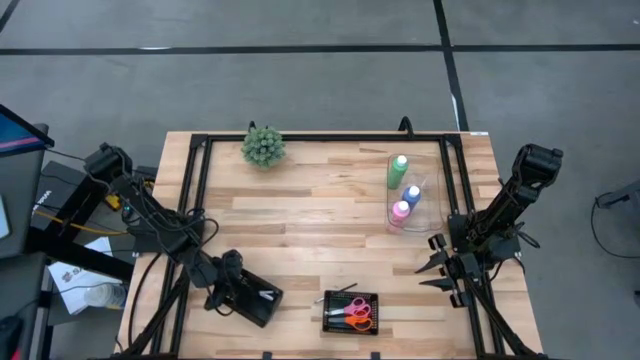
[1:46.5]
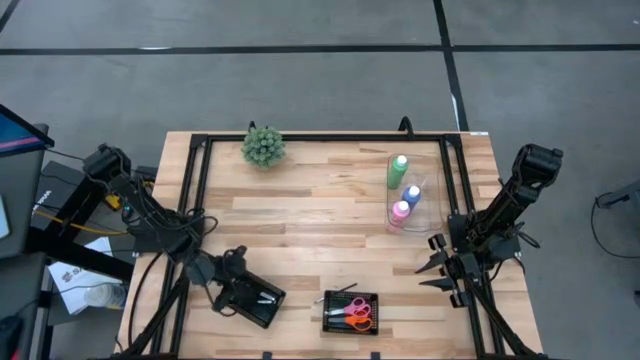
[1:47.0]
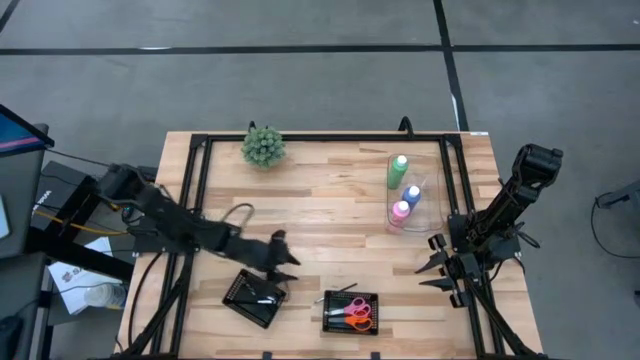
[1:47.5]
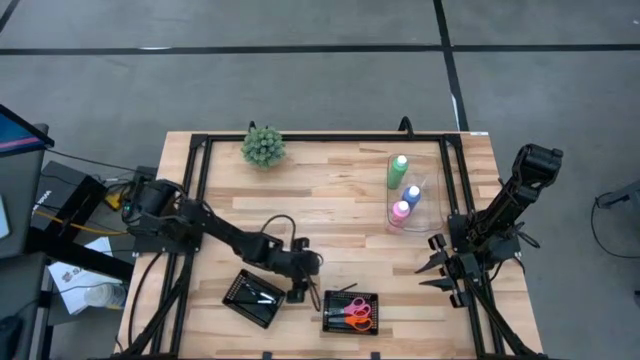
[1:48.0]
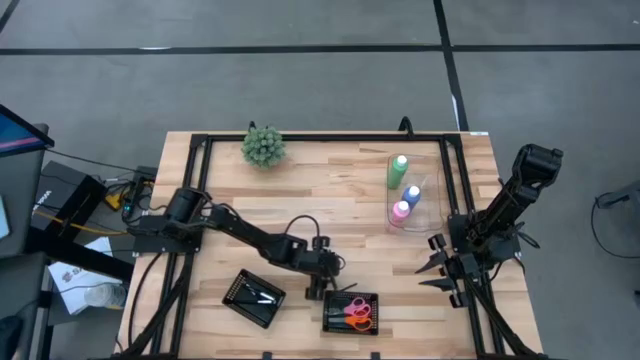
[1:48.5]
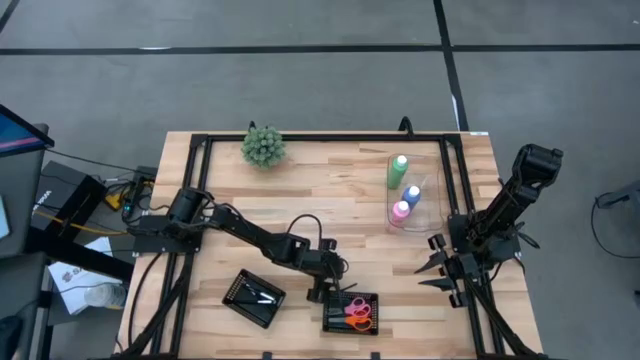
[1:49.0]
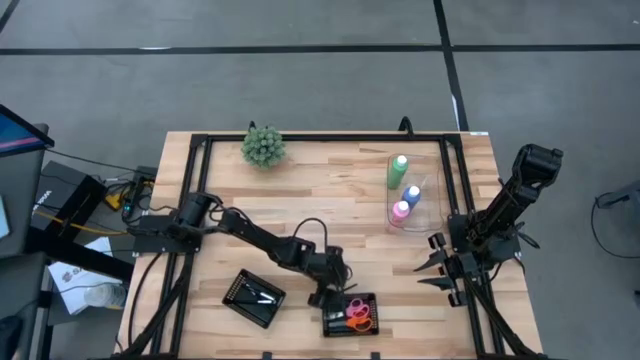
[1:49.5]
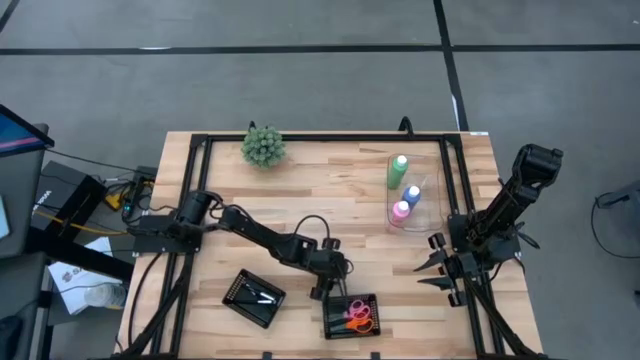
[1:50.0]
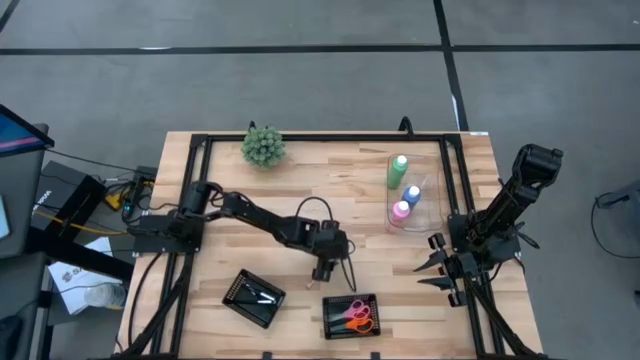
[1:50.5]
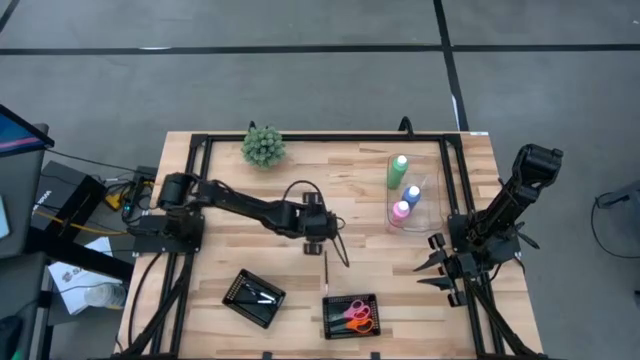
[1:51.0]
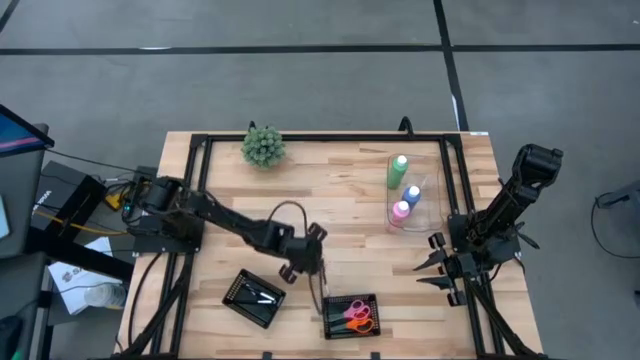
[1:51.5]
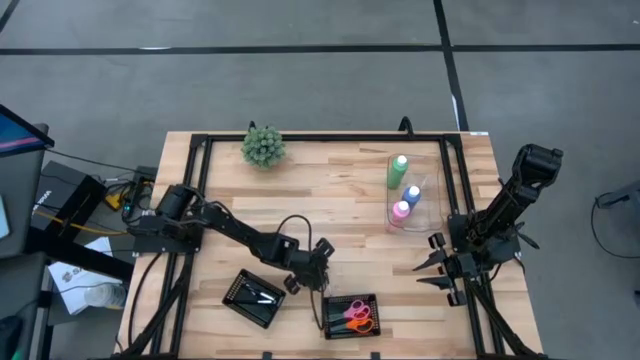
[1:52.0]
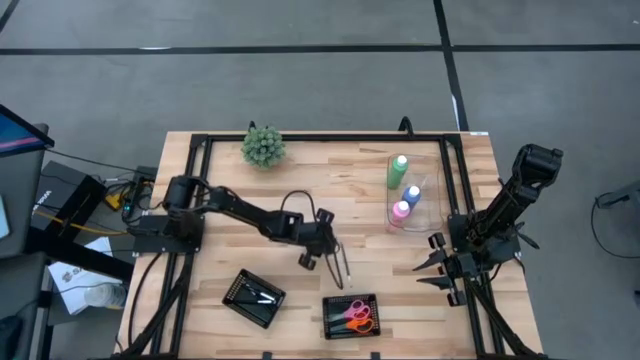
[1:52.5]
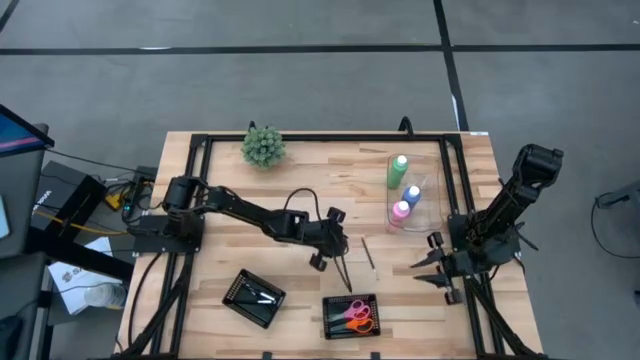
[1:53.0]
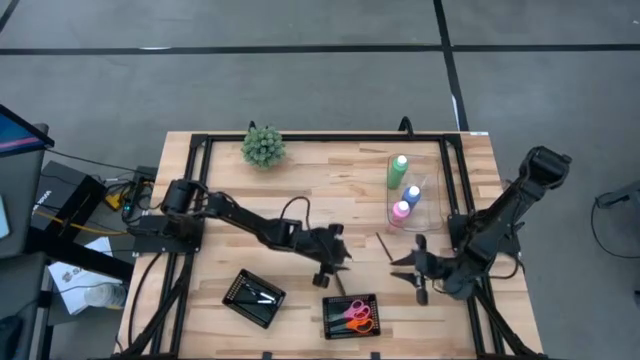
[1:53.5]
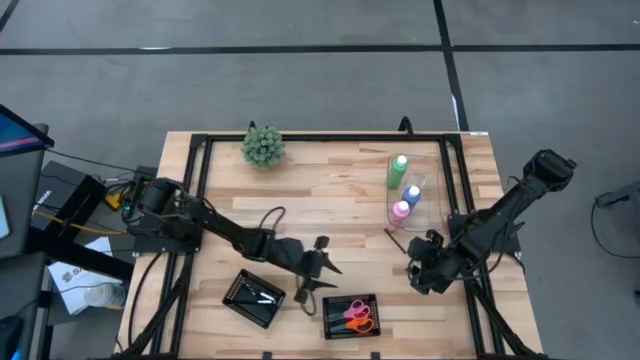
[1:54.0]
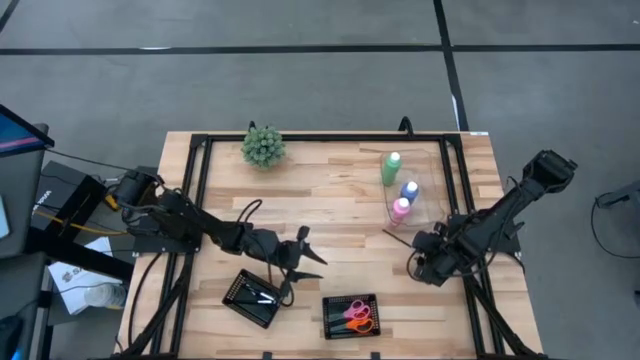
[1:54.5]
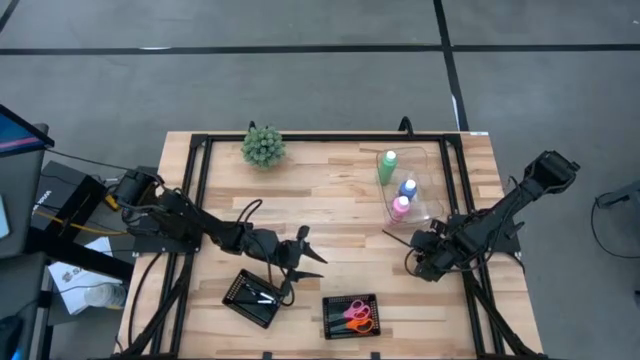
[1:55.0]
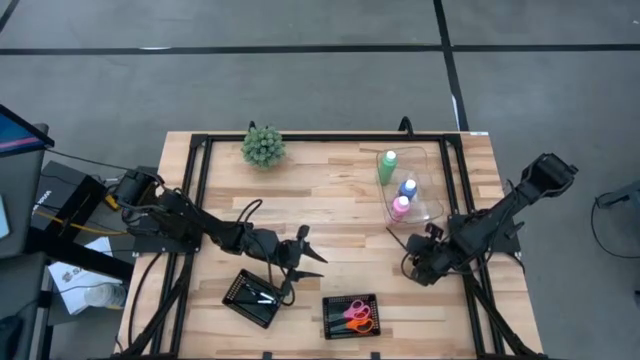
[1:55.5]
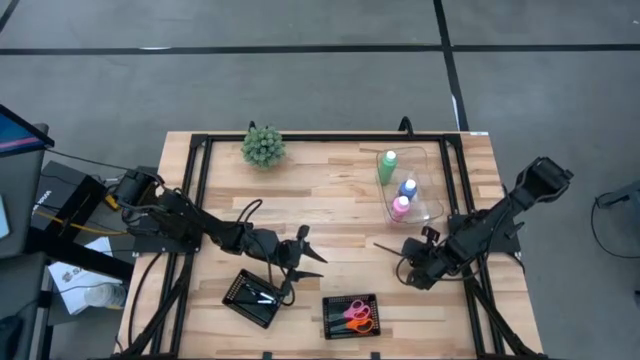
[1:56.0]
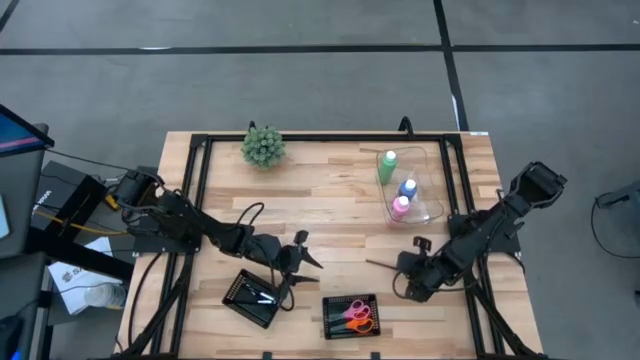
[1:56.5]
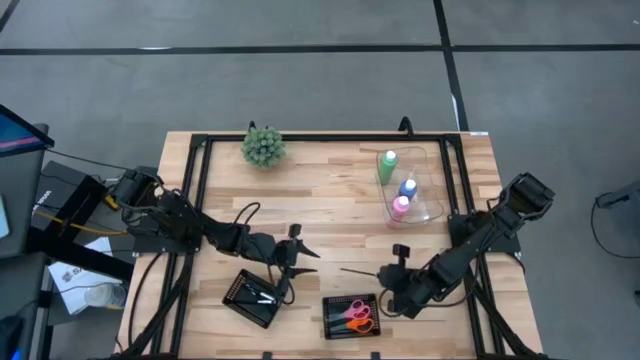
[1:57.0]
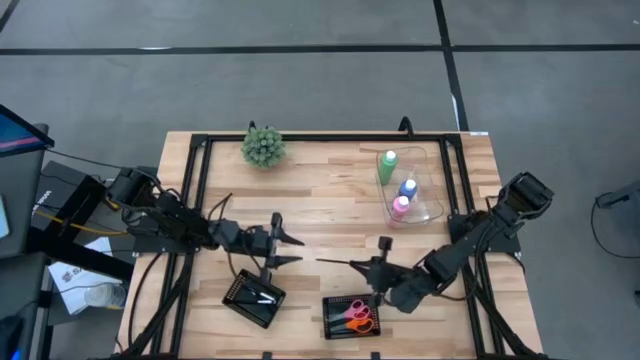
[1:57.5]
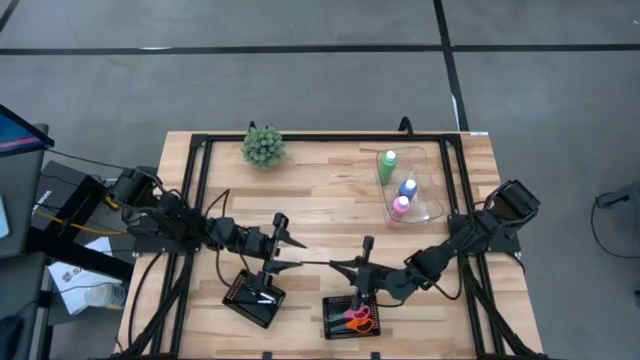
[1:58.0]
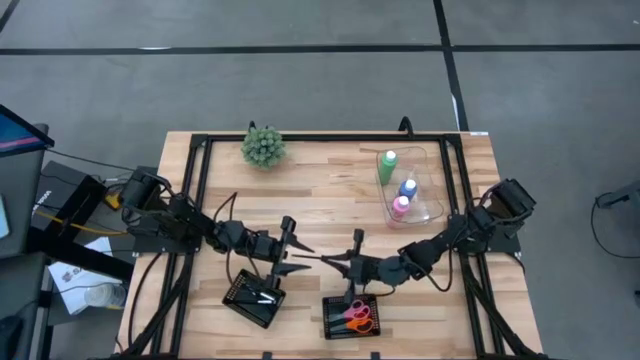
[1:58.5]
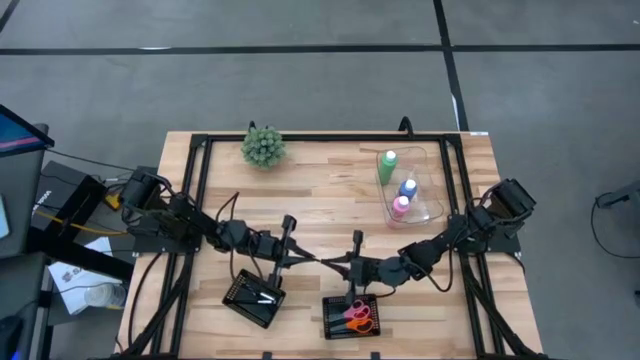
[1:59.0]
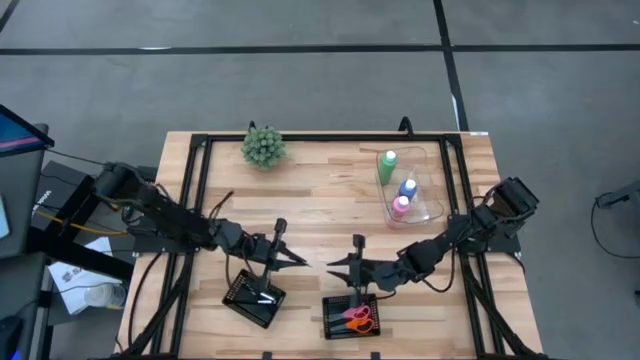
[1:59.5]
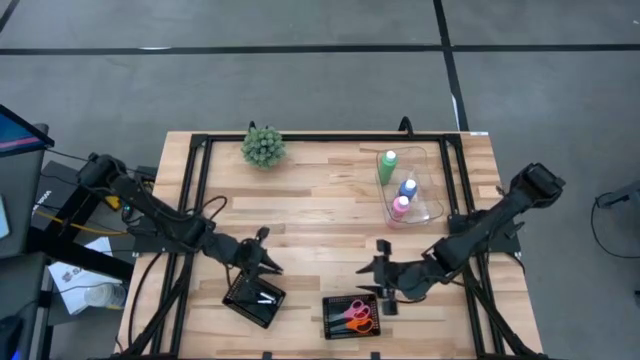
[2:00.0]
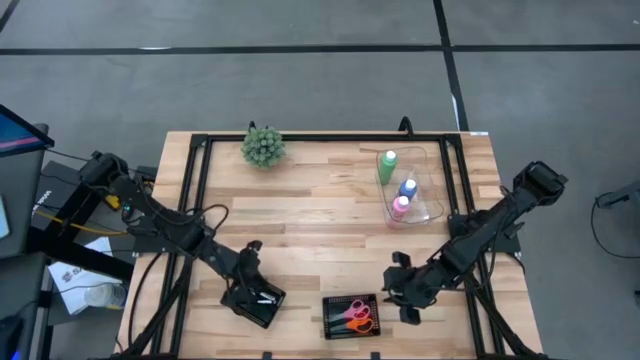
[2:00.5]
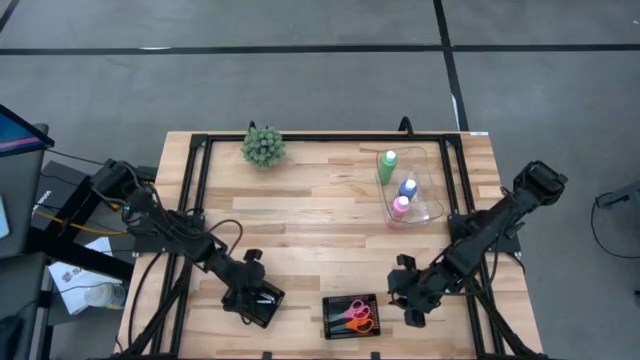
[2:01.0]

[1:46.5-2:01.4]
Task: Pick & Place Paint Supplies
Put the black makeup brush into the left black bin

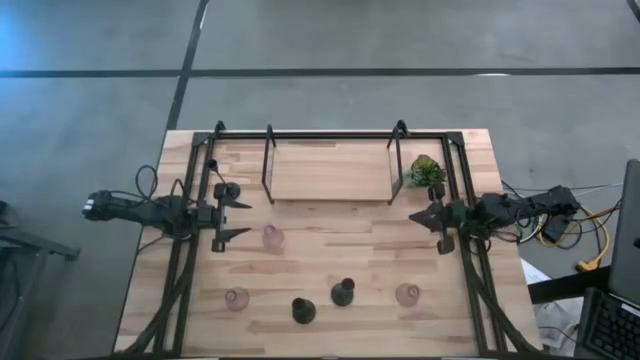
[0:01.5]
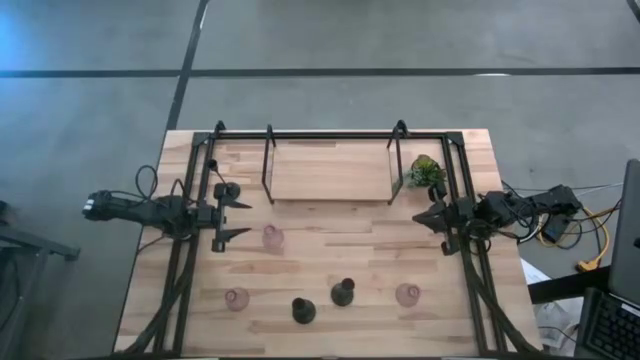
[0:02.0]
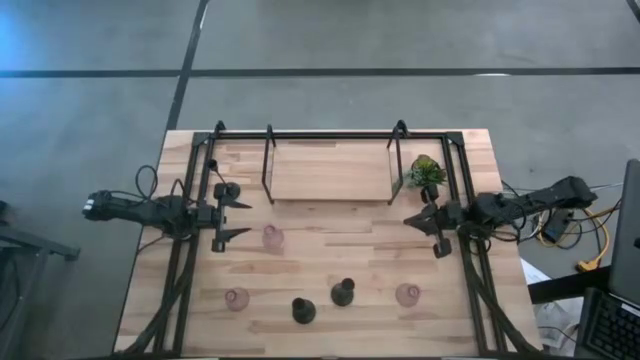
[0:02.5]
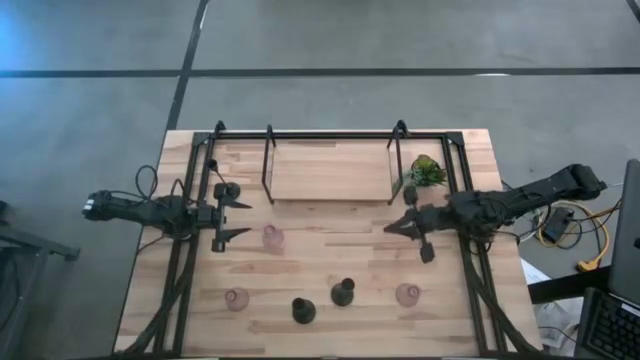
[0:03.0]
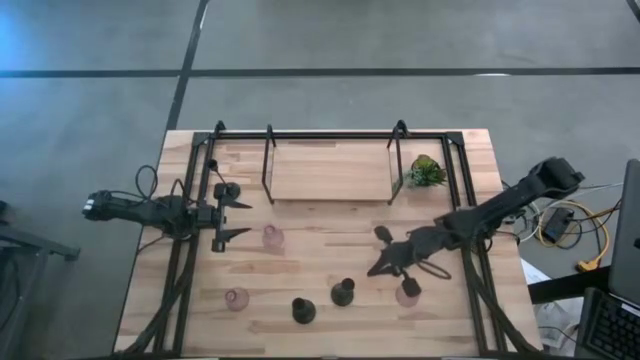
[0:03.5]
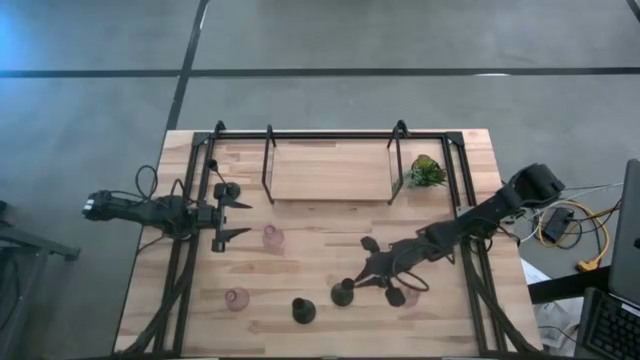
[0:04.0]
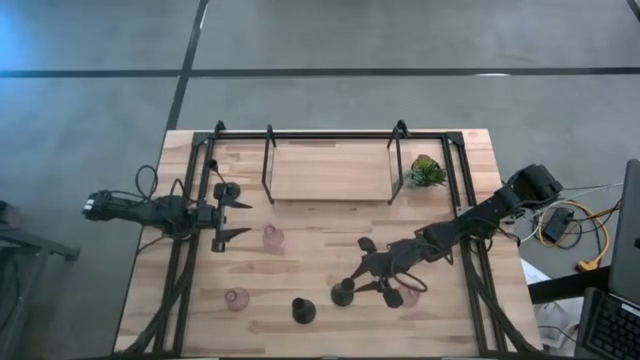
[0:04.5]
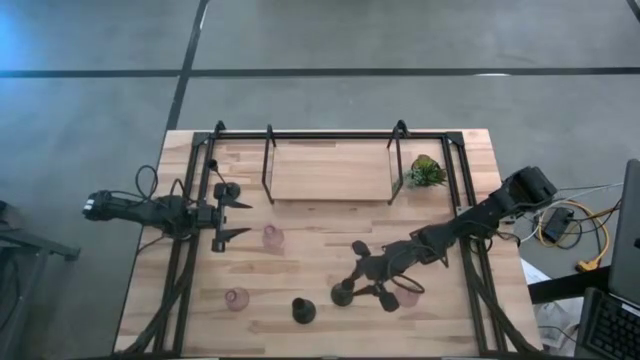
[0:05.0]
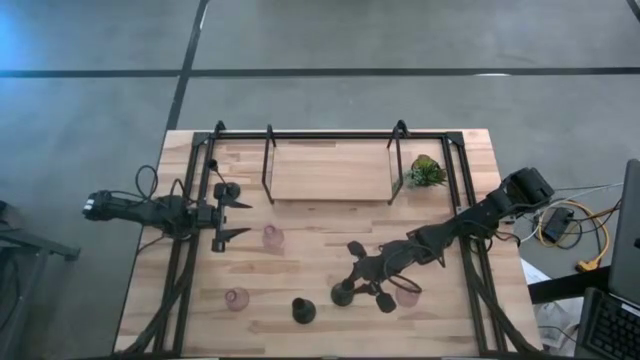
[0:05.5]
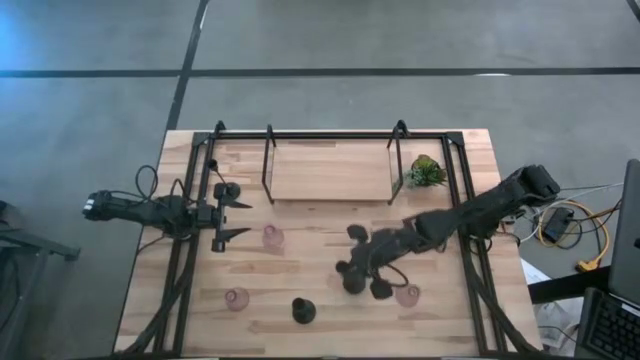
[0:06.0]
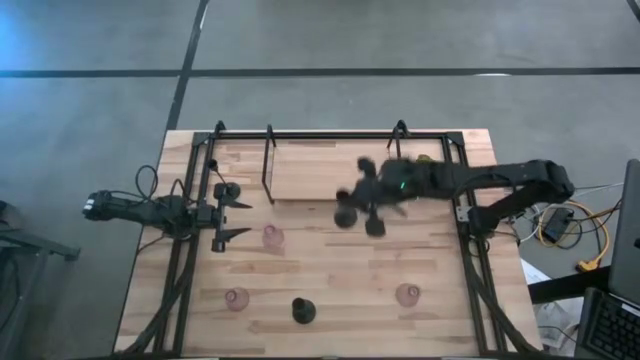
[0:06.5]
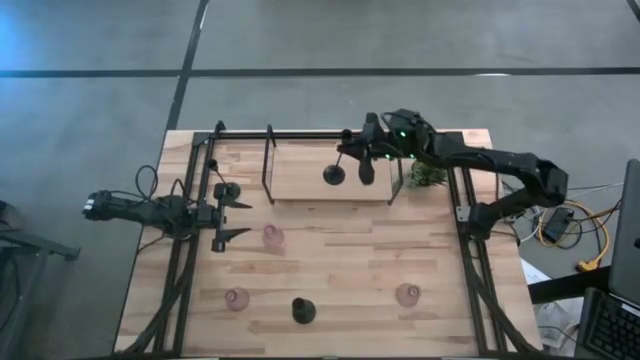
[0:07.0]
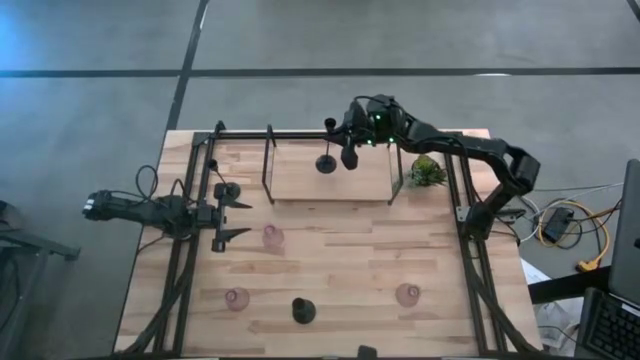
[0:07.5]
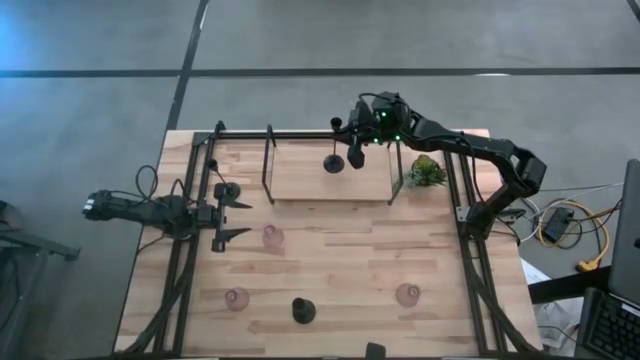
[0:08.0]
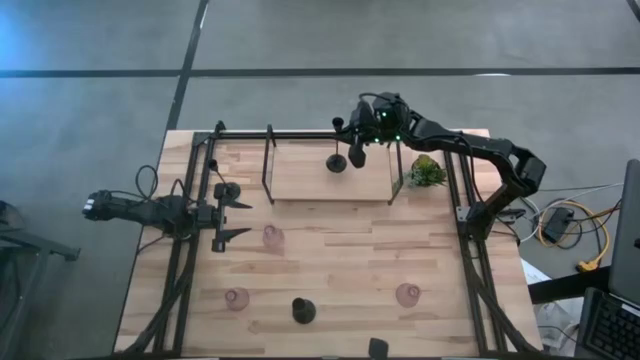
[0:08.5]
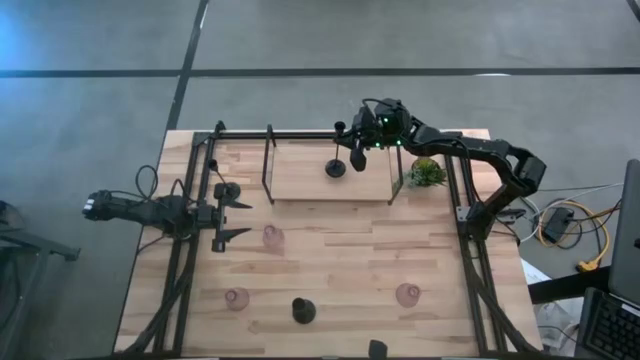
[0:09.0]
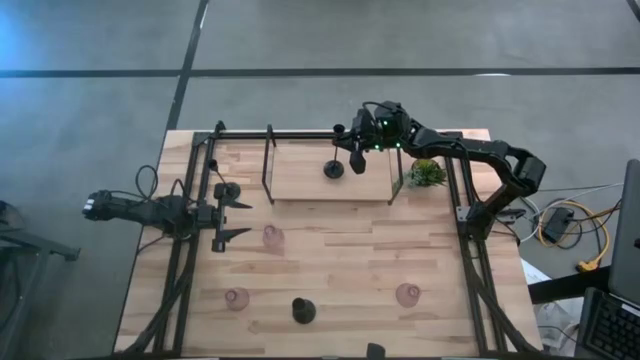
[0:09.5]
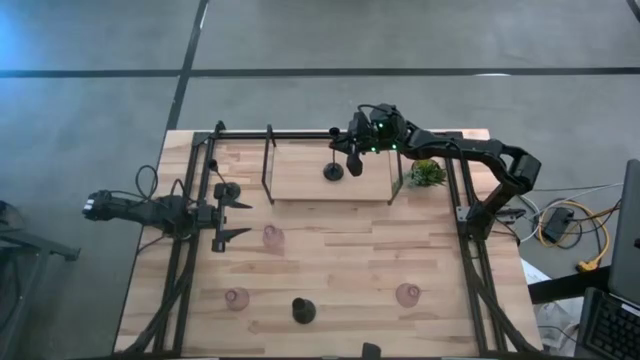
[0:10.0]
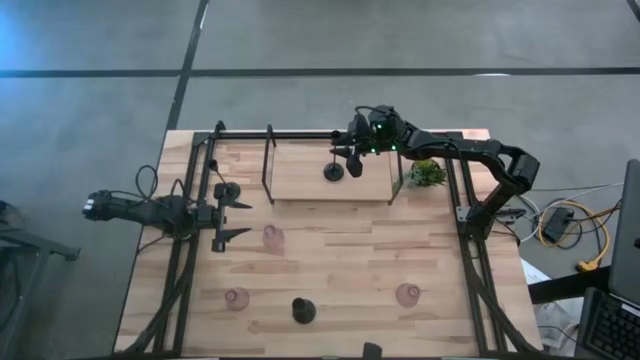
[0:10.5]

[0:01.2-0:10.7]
Task: Pick & Place candle stick holders
Put the bottom right black candle holder on the shelf
